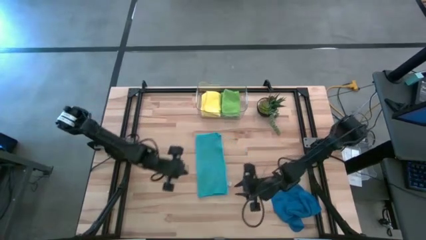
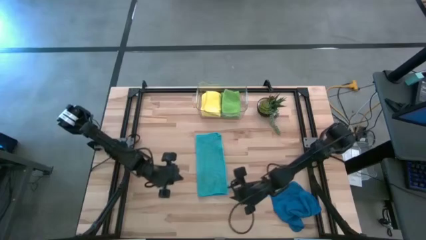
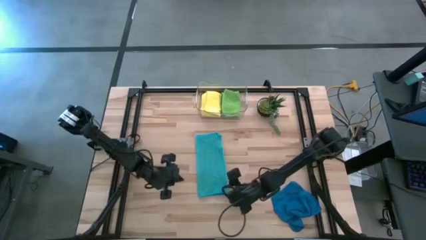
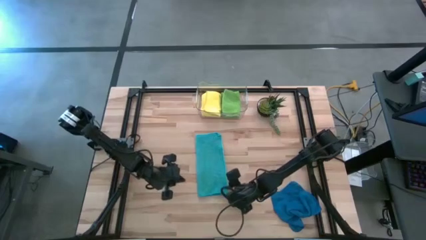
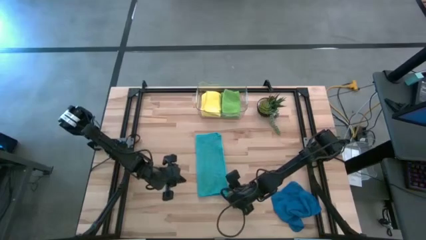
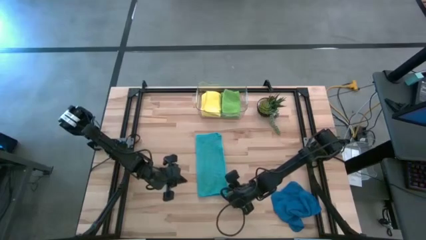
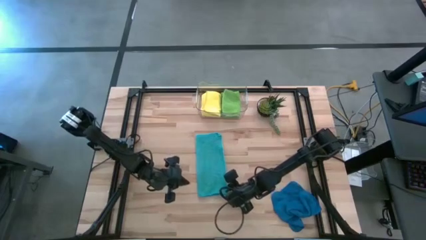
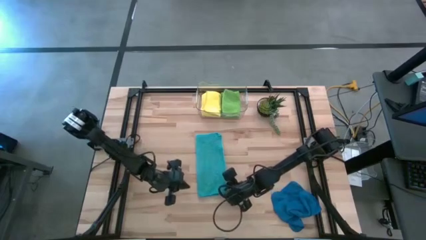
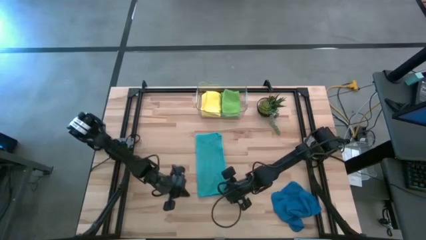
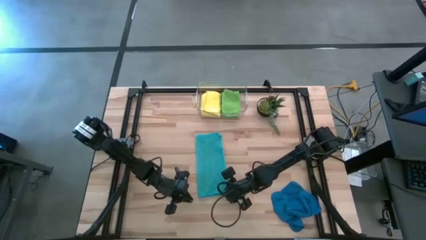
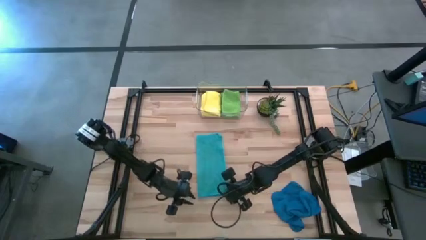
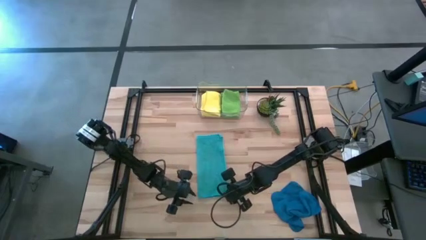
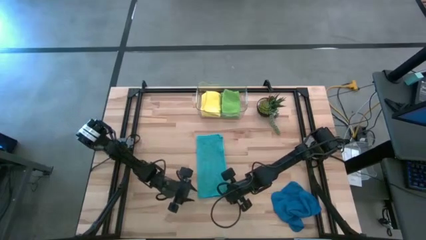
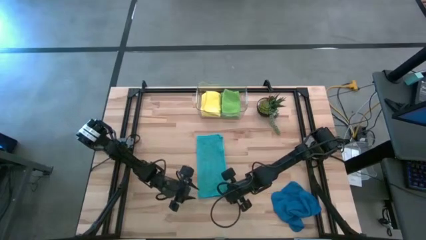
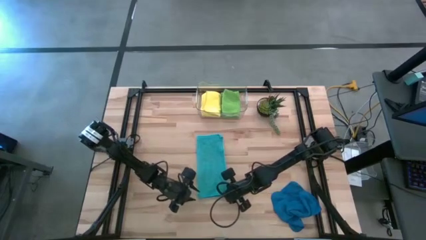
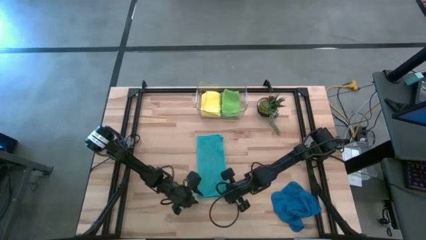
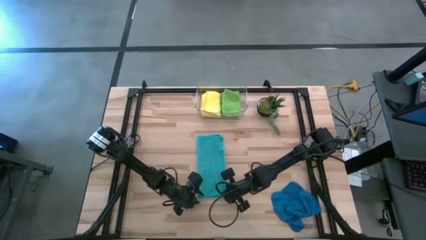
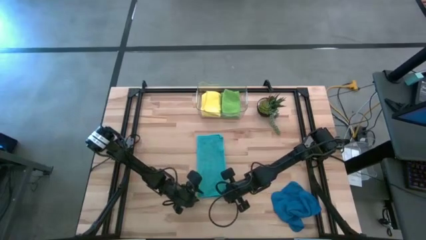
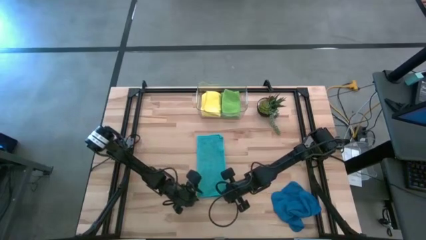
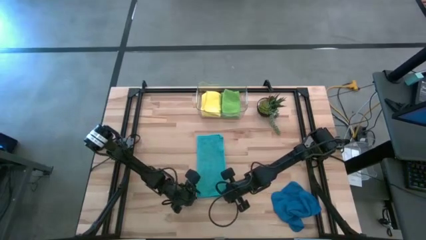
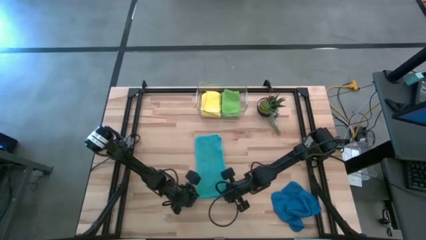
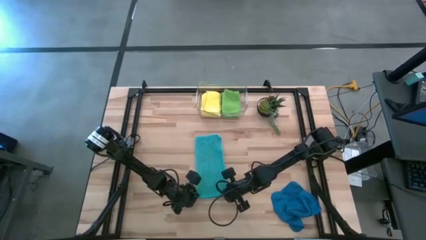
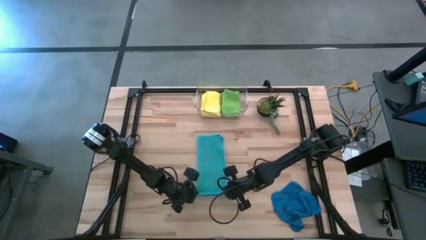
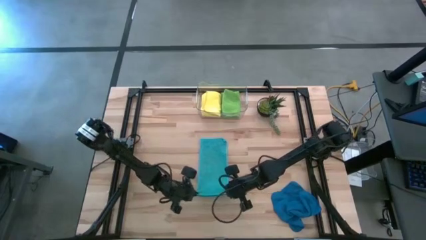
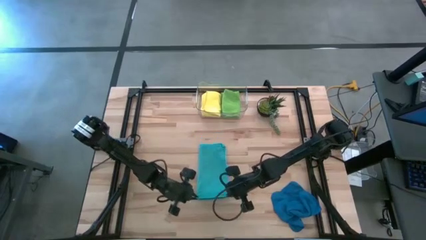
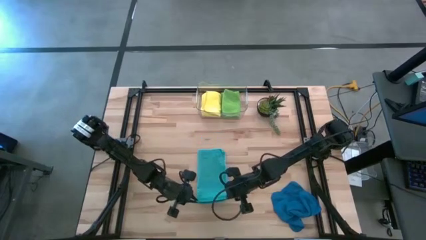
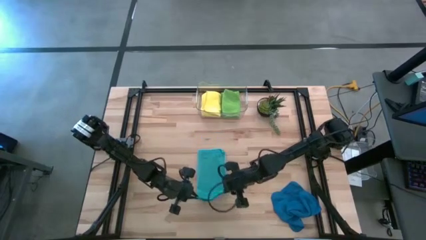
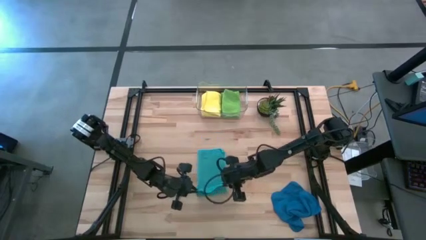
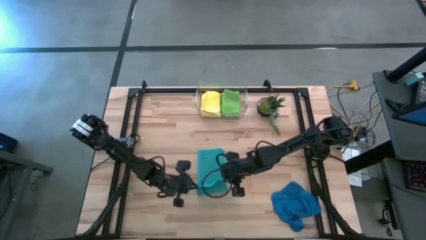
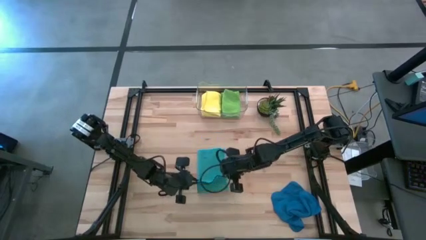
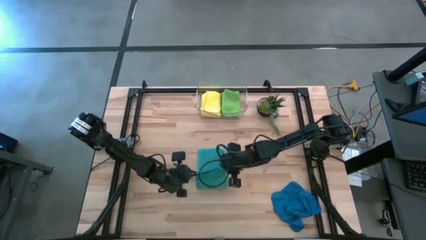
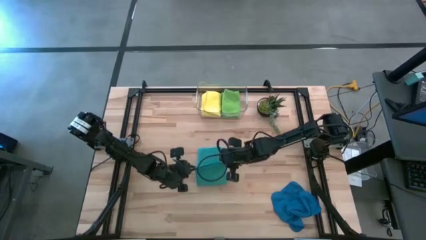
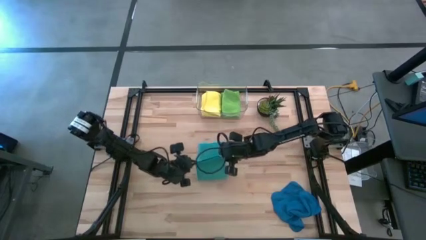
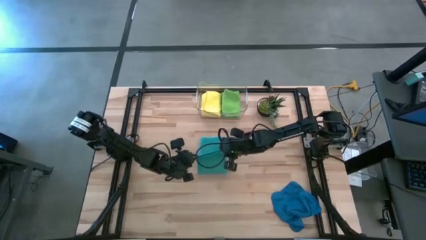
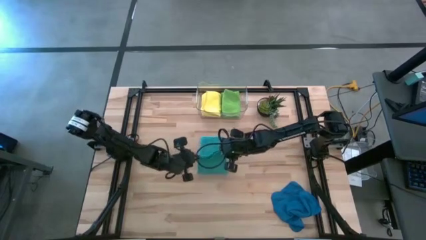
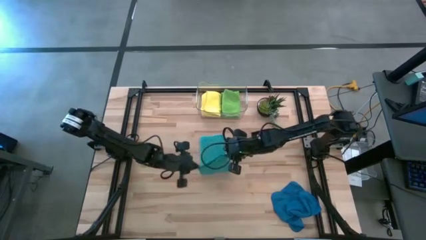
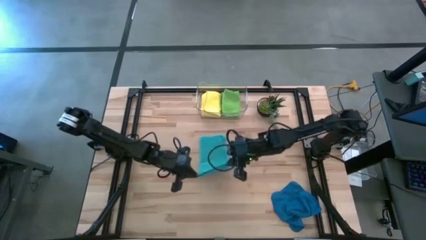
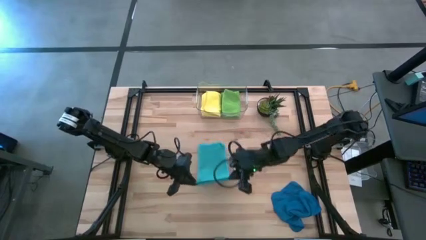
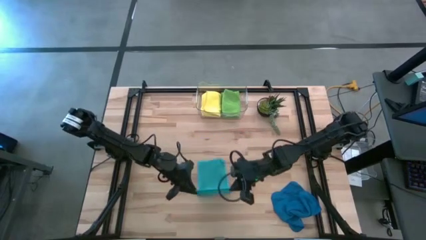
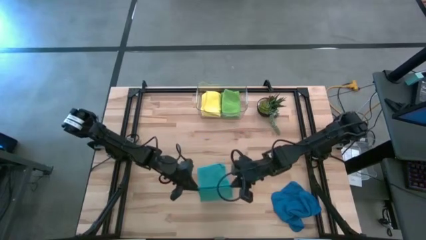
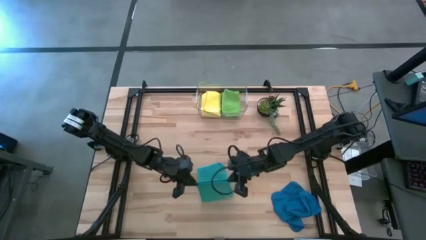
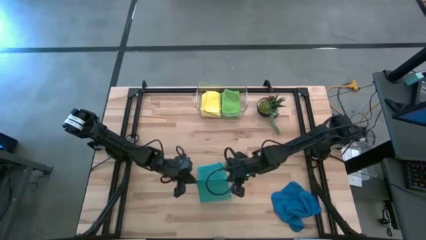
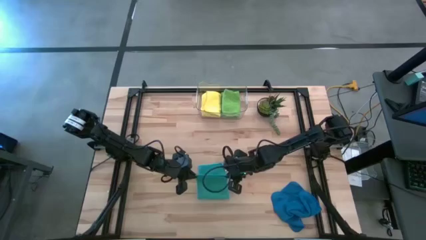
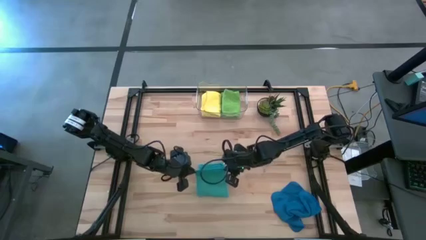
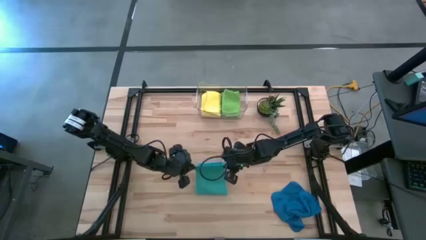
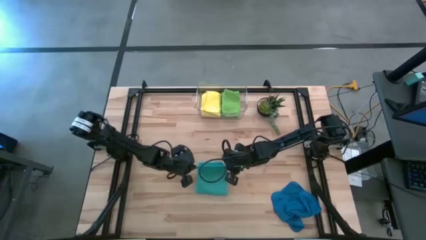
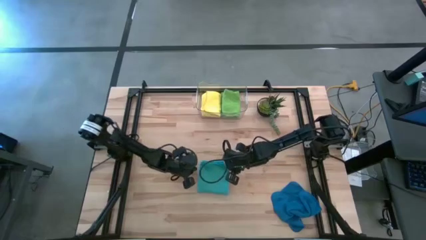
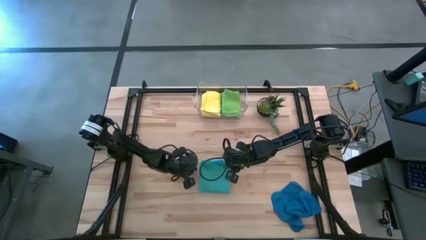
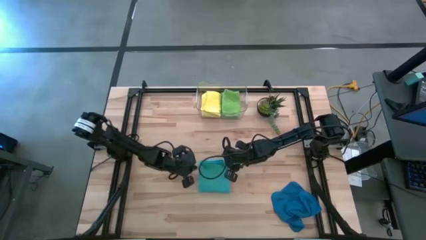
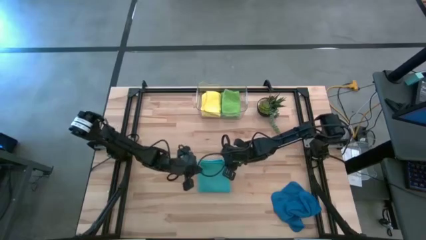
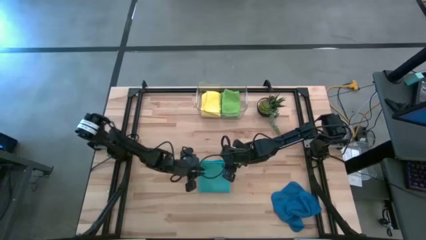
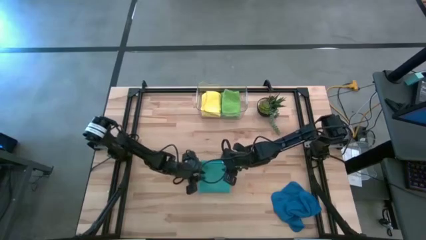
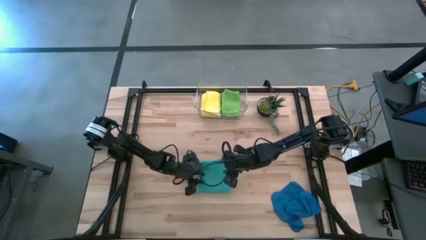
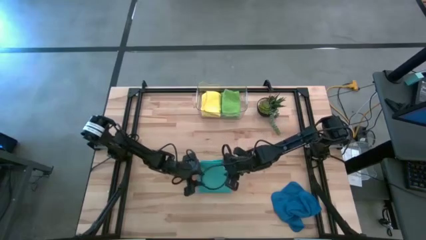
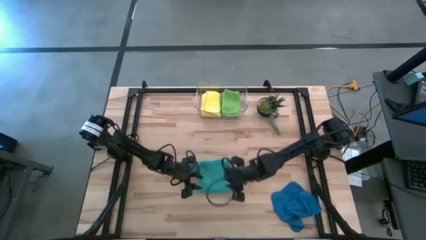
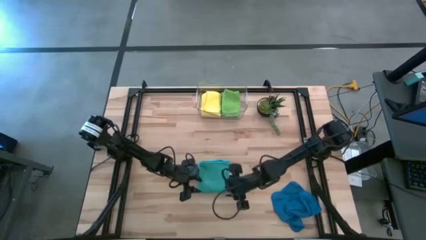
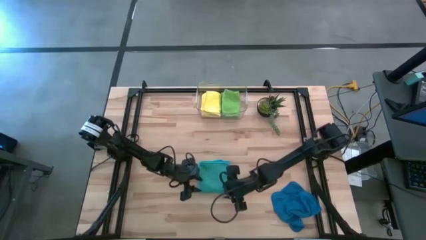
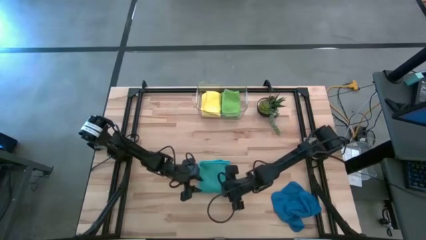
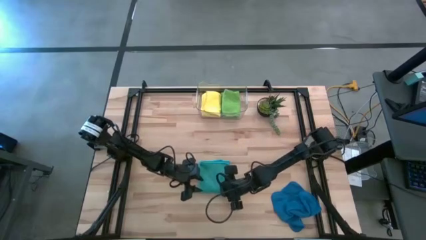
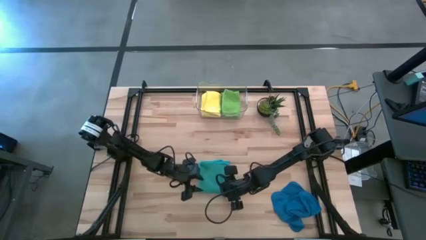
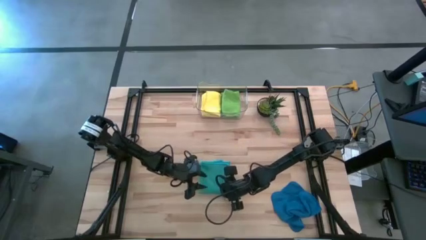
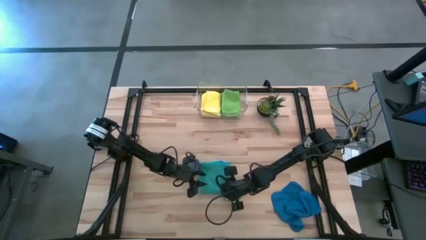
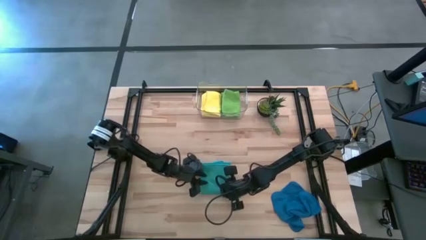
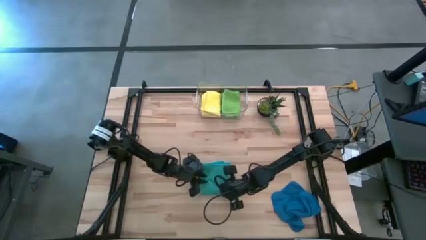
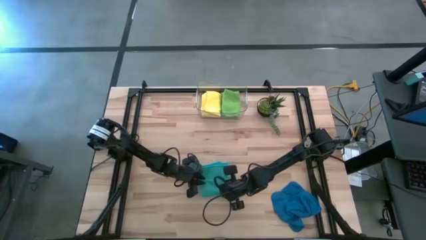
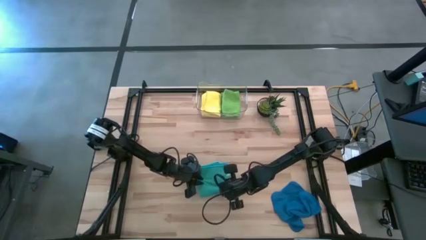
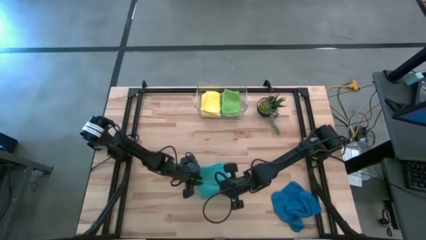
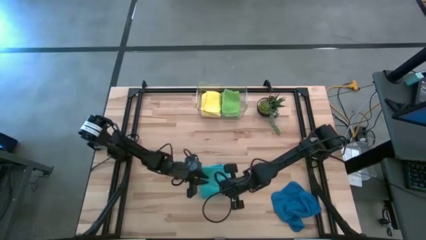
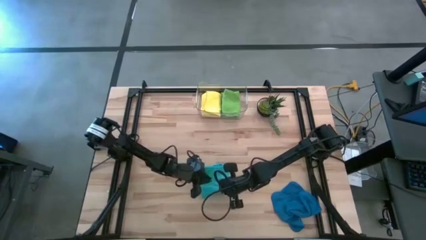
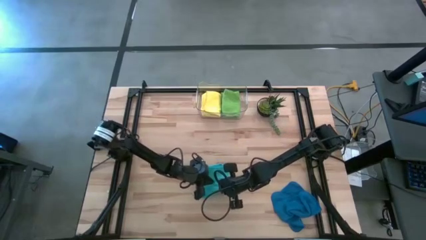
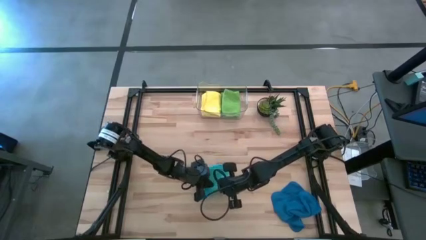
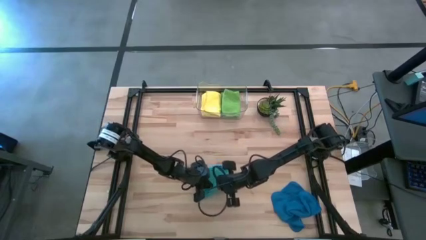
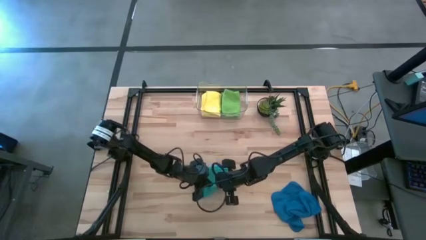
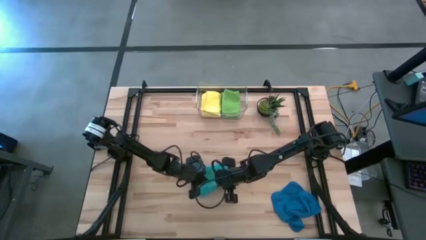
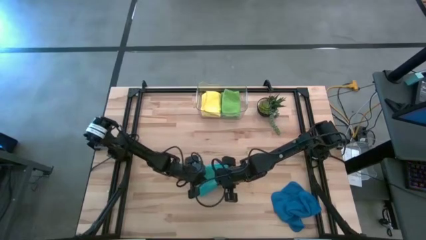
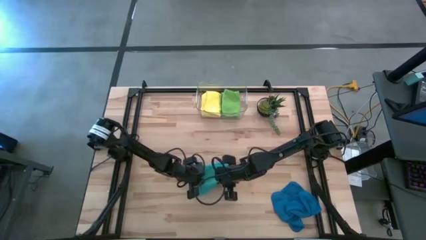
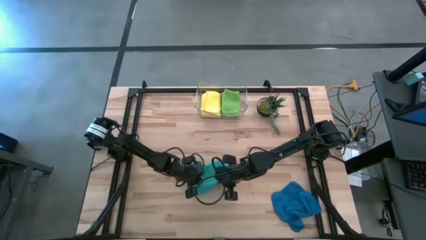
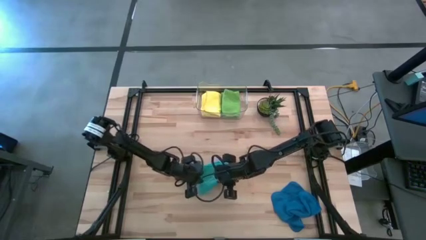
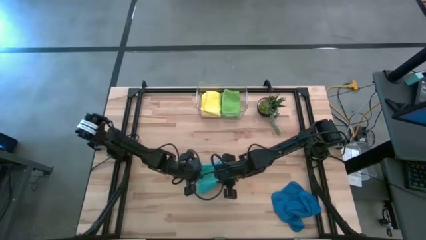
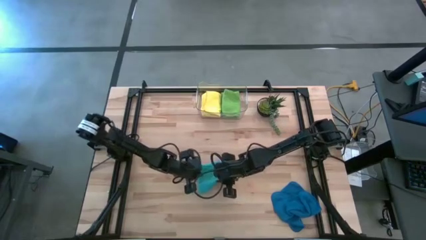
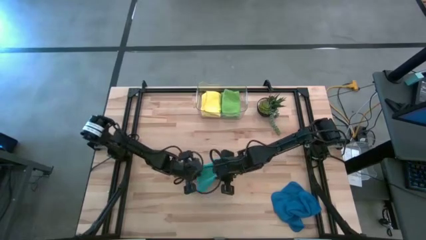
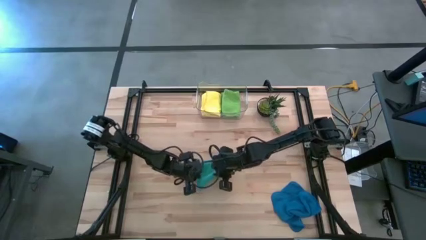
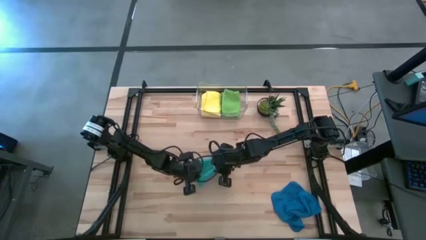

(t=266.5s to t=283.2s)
Task: Fold microfiber towels
Fold the light blue microfiber towel
